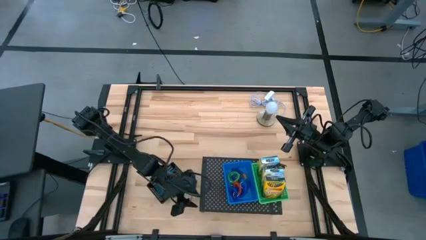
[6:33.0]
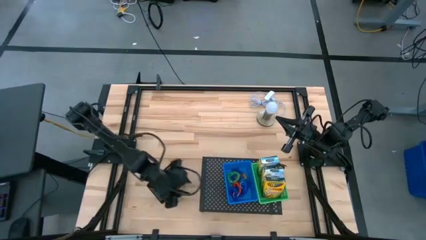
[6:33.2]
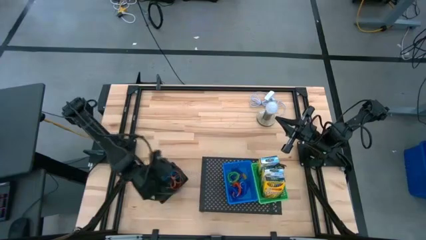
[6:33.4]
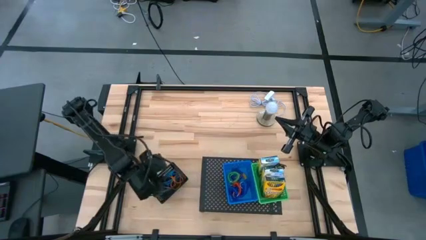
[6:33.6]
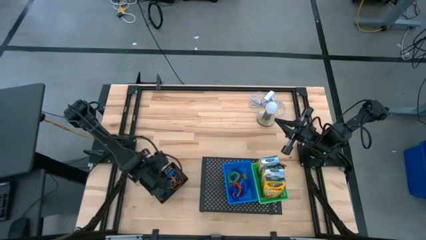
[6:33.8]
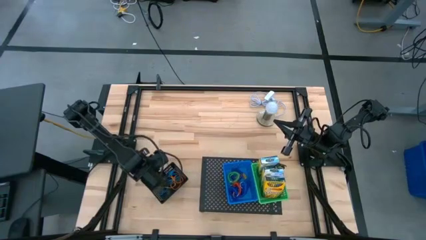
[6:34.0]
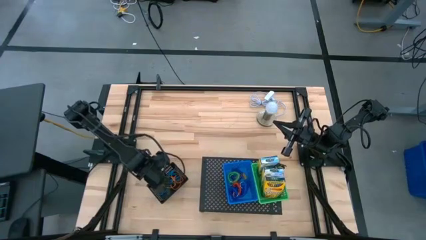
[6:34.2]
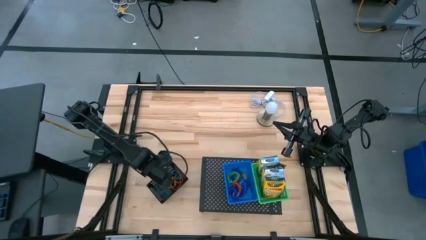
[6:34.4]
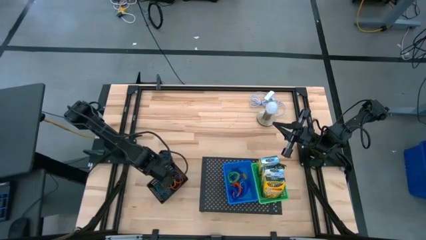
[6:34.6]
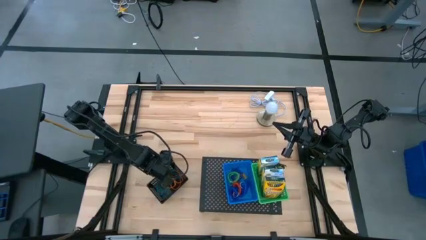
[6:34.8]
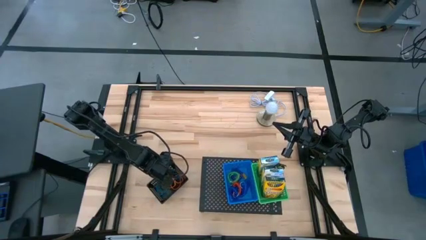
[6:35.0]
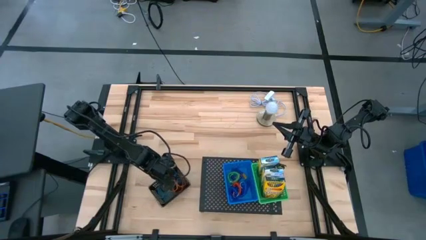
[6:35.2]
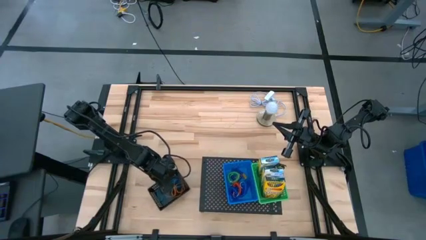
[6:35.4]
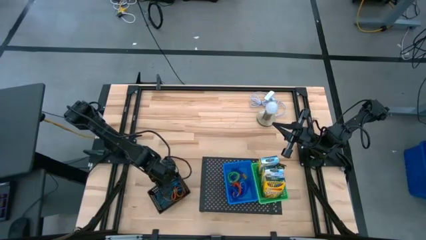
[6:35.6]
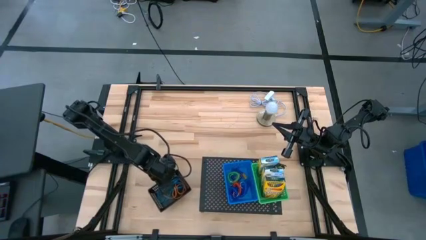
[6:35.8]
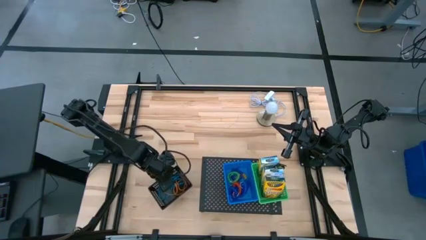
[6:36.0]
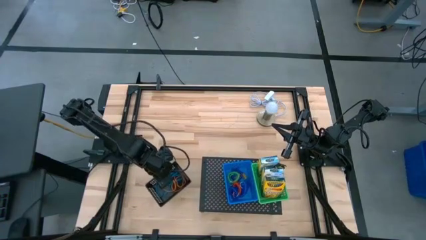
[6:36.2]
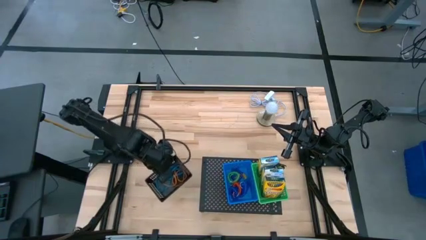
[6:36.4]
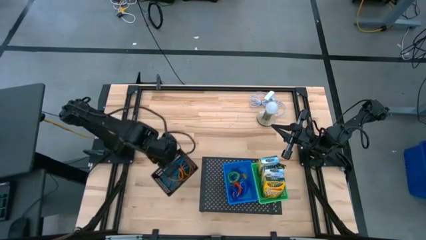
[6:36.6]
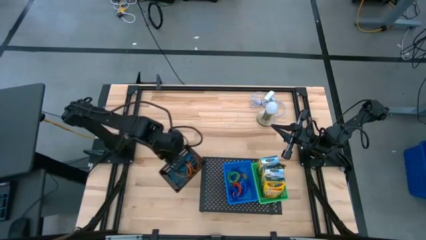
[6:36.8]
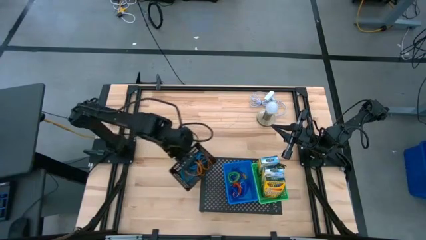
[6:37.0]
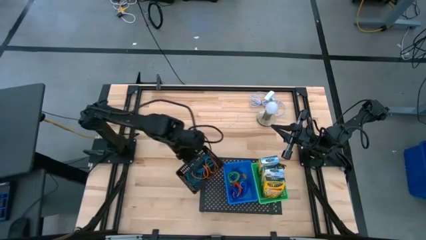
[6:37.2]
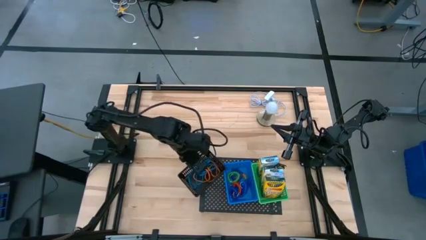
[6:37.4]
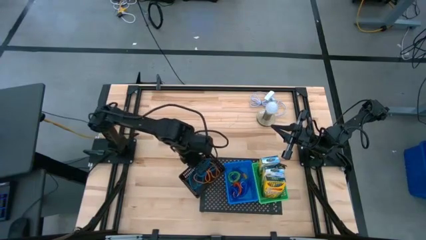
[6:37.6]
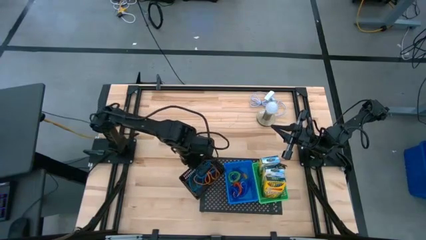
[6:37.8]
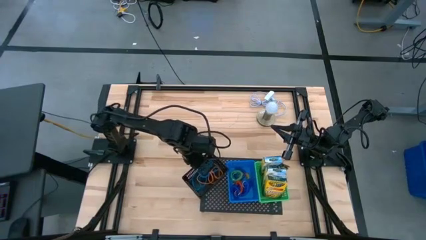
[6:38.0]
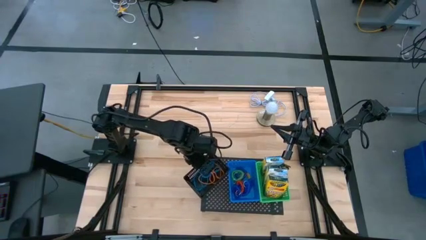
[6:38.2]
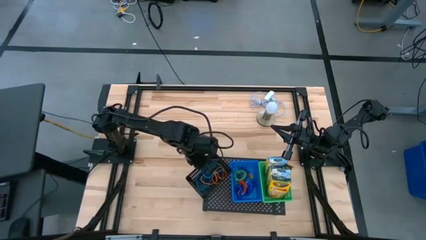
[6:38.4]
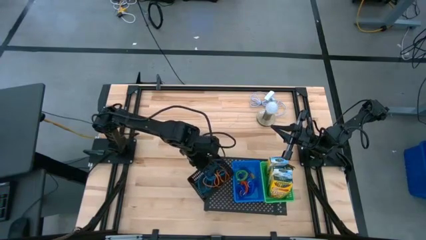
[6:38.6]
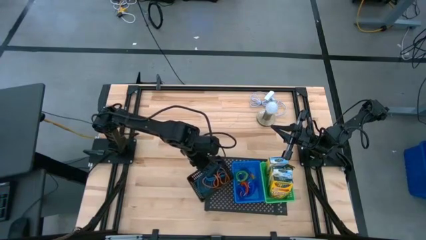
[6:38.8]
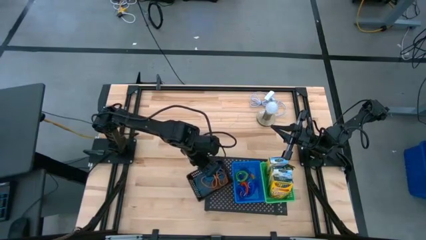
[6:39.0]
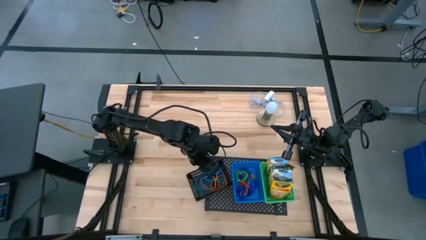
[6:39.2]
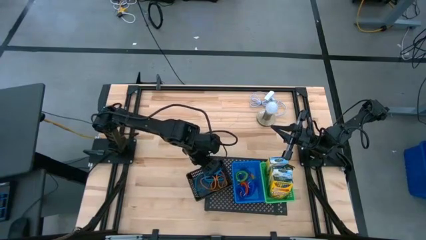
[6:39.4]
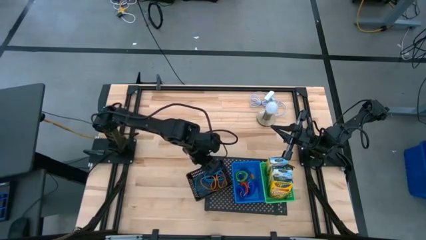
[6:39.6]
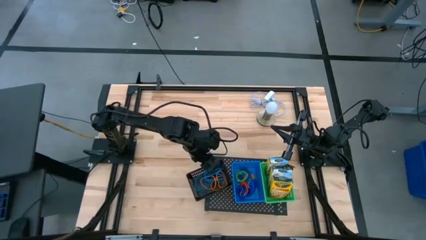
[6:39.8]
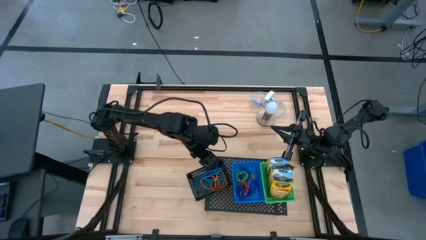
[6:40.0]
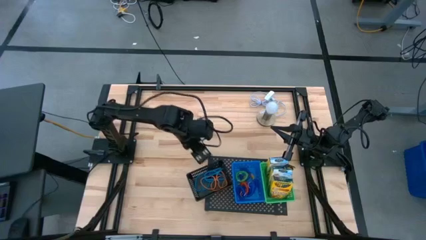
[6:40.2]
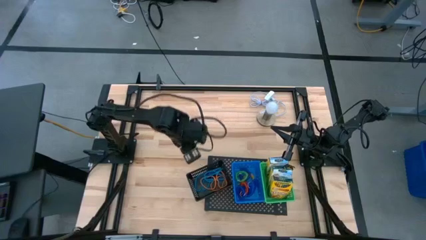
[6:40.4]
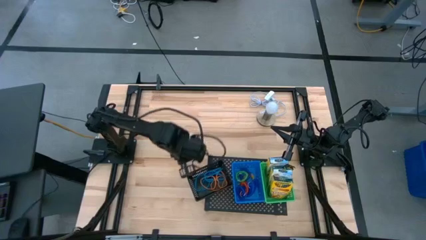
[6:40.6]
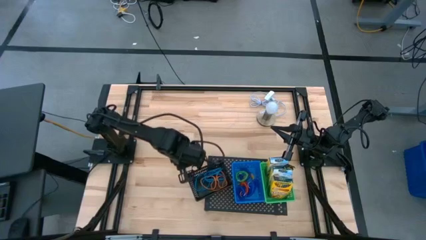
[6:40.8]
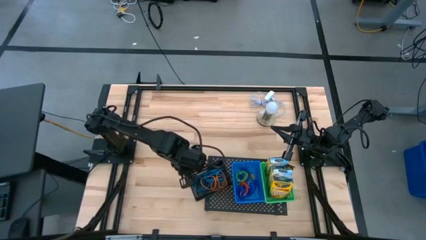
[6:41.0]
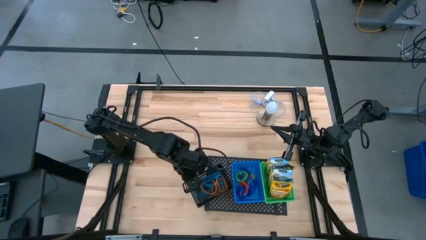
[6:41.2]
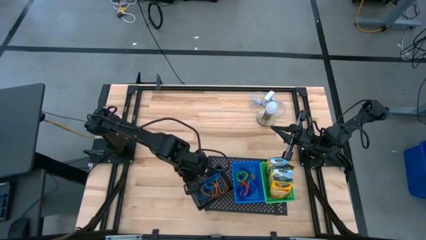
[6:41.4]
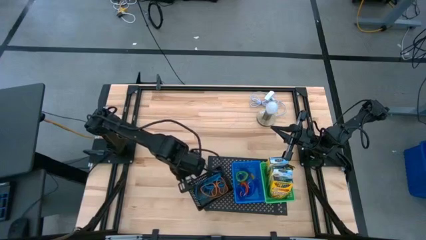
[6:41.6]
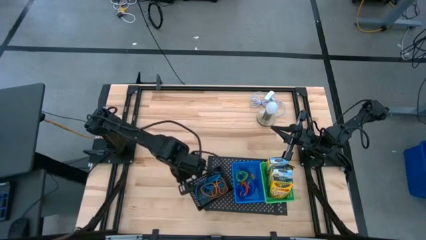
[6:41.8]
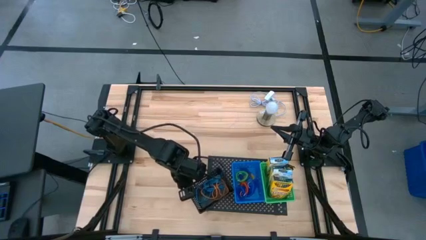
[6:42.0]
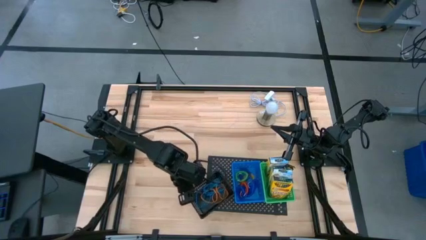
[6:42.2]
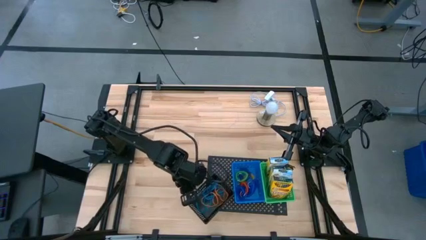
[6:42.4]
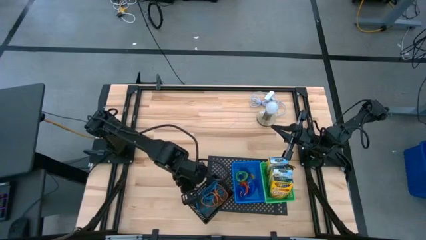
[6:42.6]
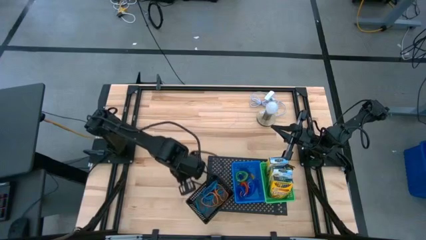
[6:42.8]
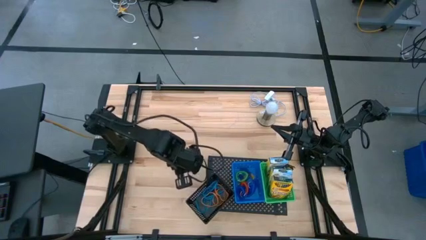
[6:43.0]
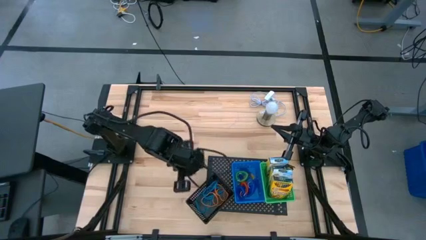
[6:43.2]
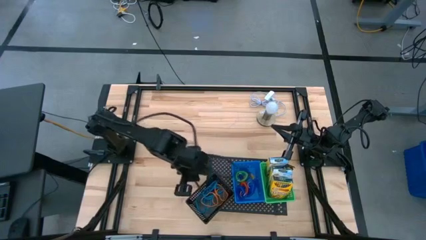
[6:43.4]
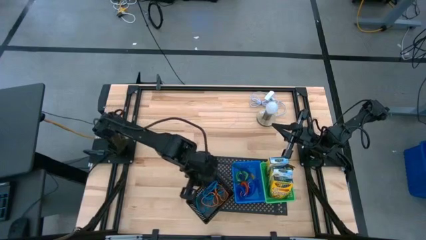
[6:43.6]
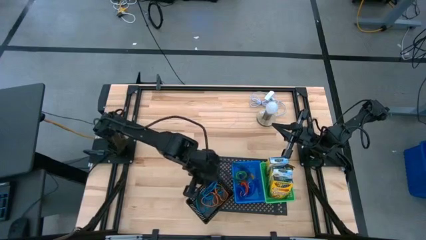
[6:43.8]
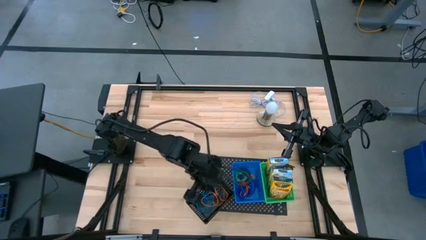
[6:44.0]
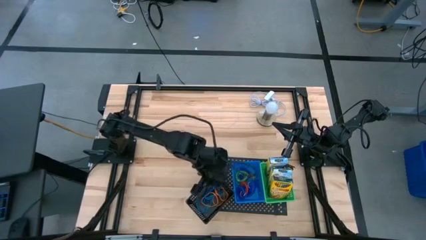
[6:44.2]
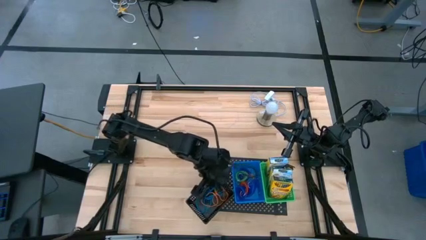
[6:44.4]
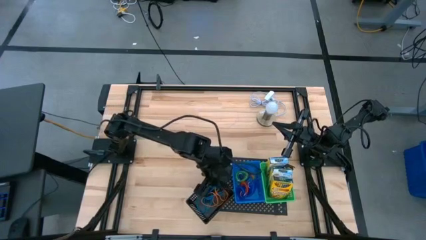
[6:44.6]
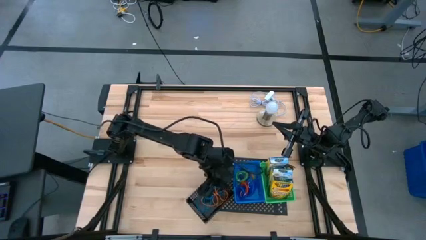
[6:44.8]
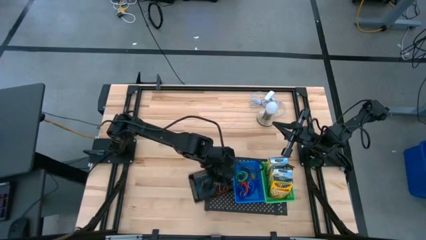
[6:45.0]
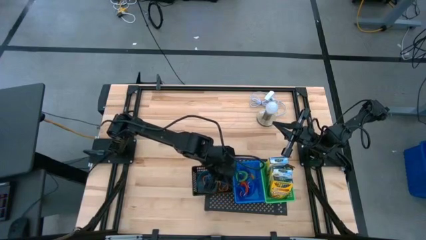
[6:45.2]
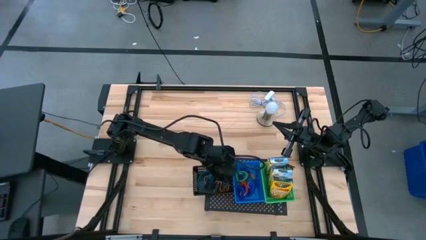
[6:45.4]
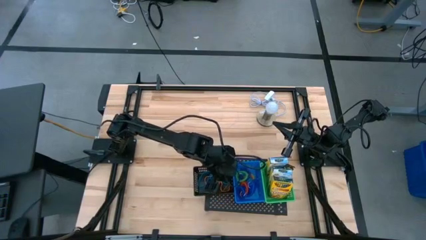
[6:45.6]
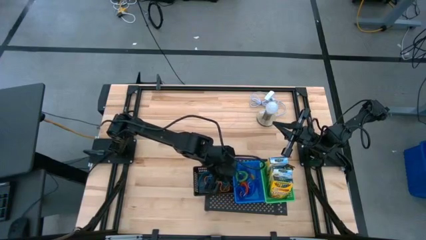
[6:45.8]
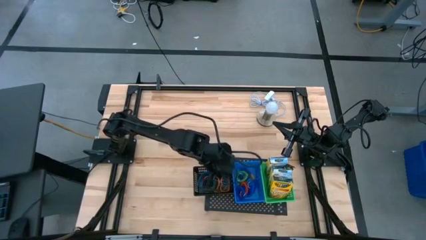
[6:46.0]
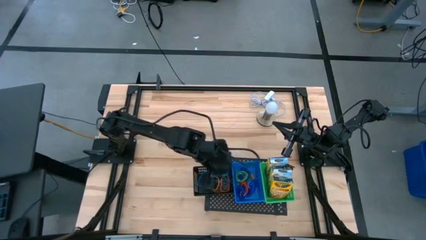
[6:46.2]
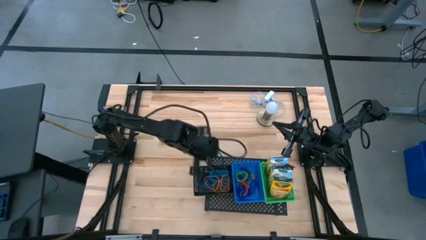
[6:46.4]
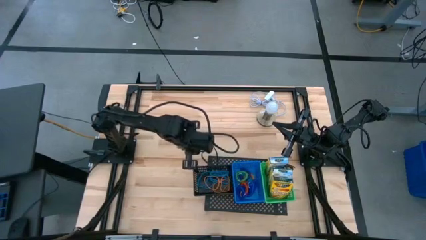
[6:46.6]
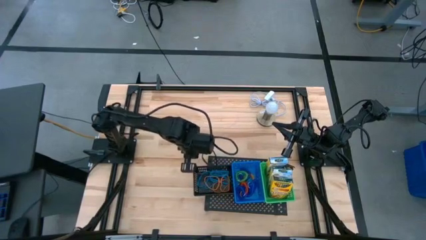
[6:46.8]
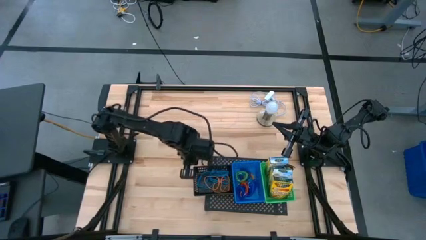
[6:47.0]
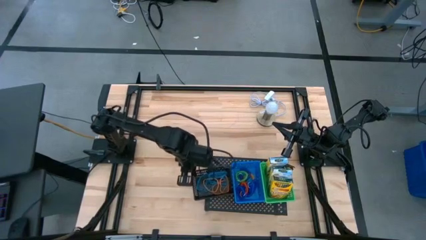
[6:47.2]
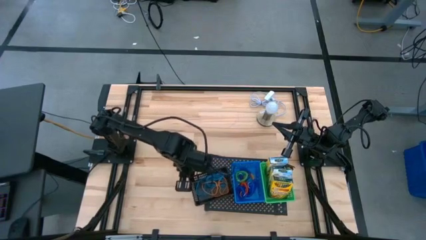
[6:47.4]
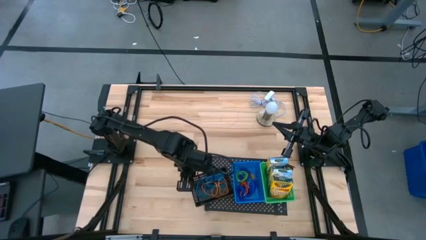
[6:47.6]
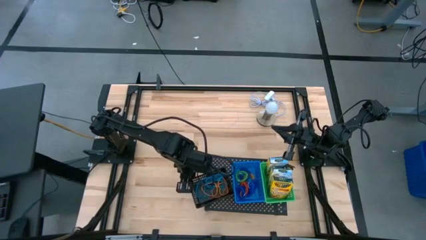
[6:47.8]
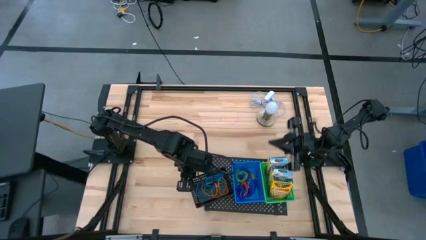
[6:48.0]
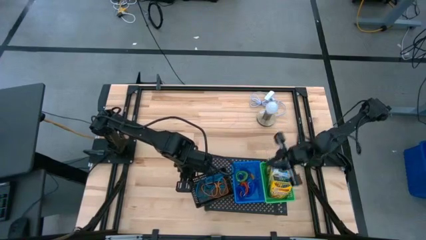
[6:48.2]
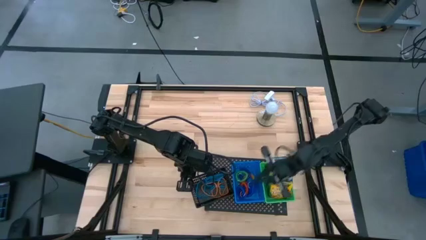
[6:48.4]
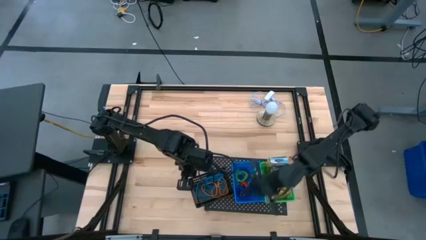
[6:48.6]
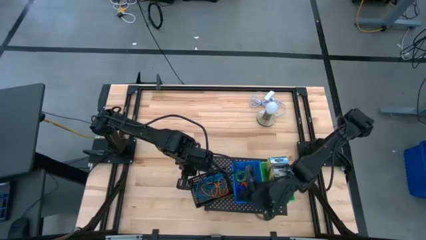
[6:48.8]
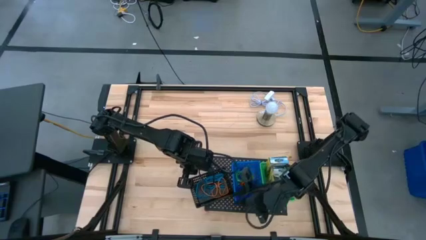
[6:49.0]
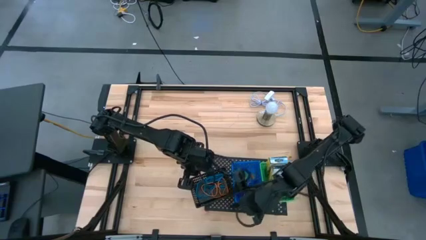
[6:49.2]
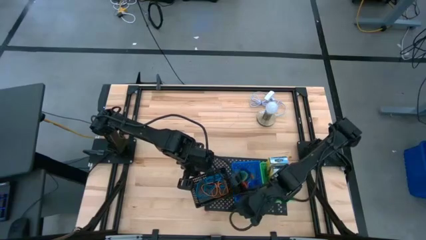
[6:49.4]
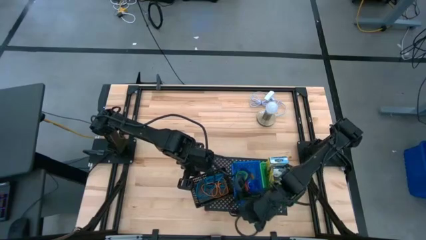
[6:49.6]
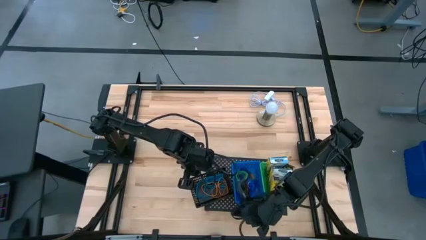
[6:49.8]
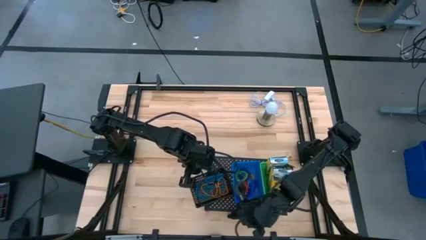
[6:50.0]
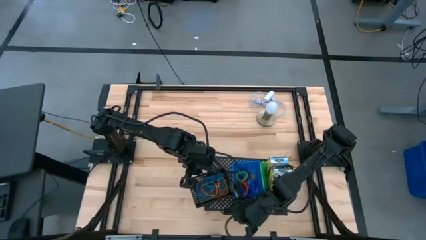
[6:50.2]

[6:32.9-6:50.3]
Task: Pick & Place Office Desk Supplies
Put the black bin with the rubber bands on the shelf
